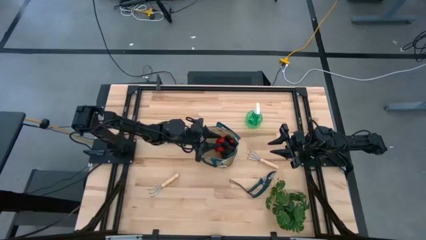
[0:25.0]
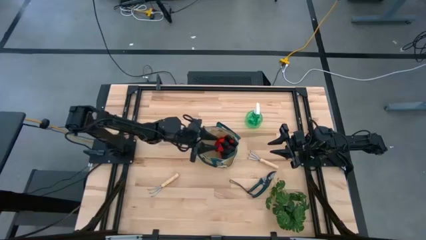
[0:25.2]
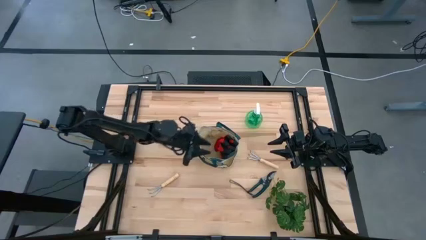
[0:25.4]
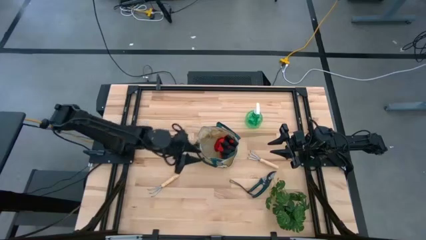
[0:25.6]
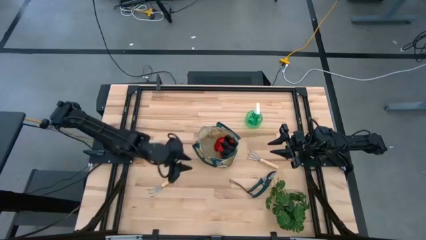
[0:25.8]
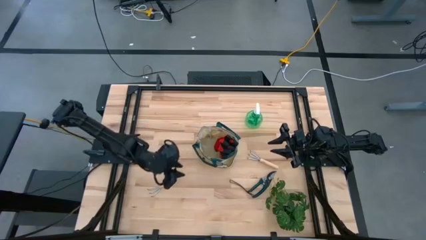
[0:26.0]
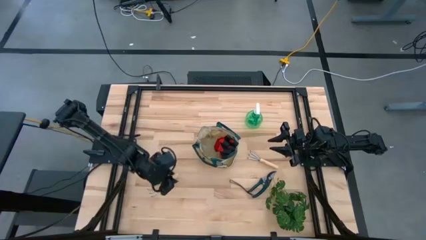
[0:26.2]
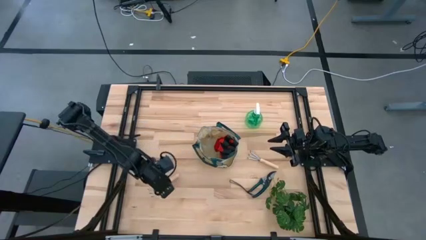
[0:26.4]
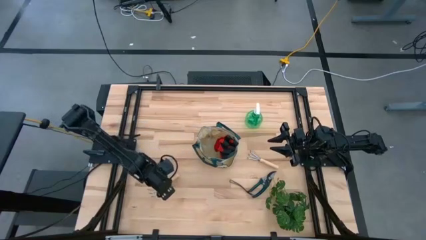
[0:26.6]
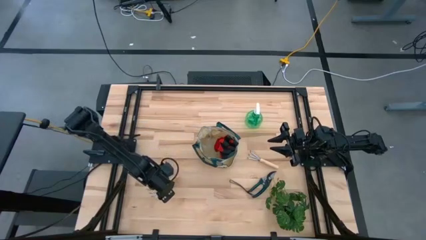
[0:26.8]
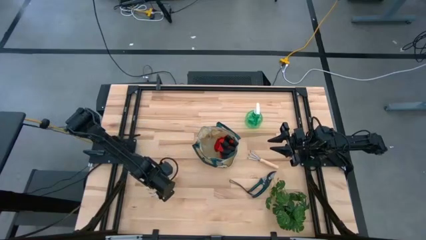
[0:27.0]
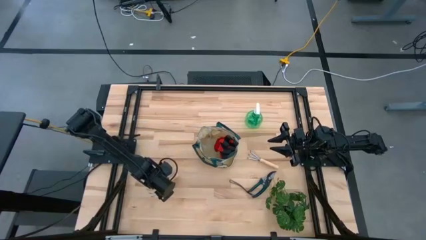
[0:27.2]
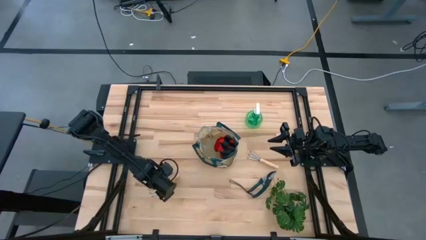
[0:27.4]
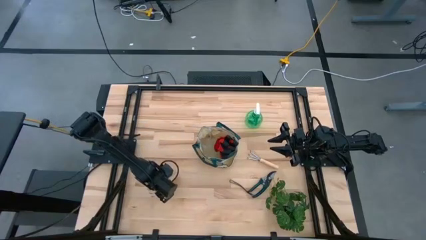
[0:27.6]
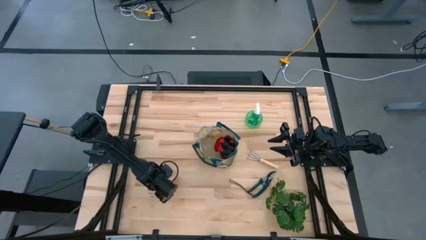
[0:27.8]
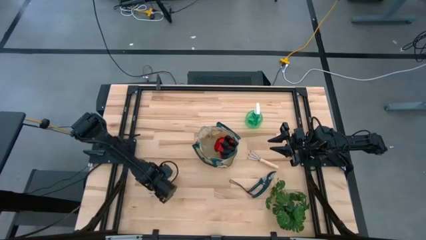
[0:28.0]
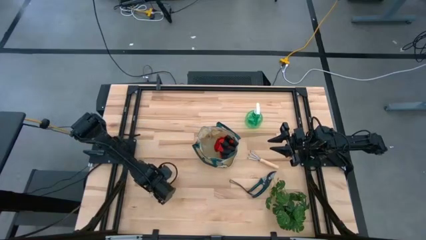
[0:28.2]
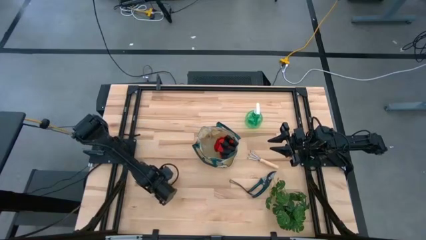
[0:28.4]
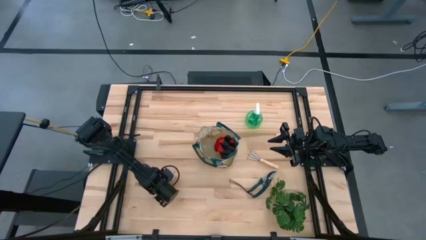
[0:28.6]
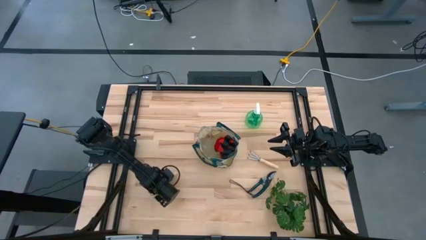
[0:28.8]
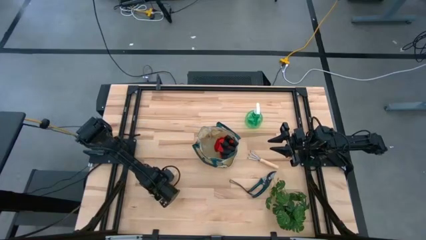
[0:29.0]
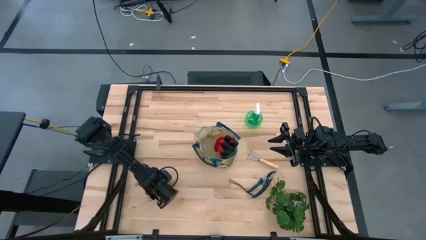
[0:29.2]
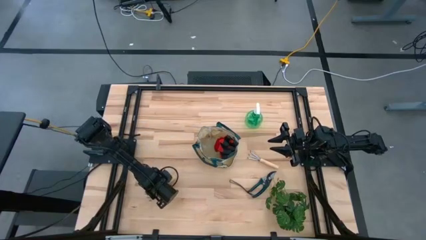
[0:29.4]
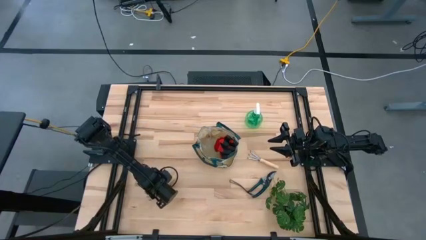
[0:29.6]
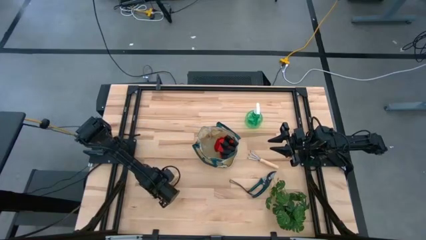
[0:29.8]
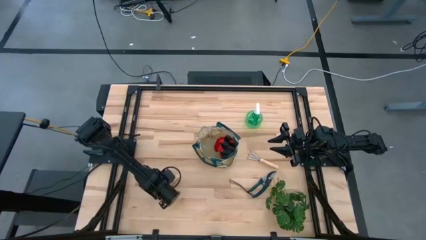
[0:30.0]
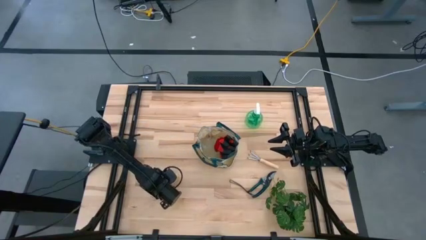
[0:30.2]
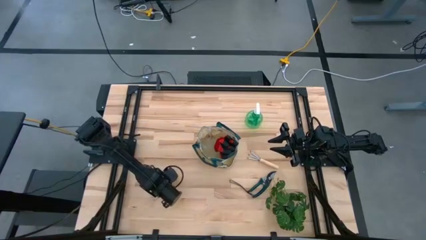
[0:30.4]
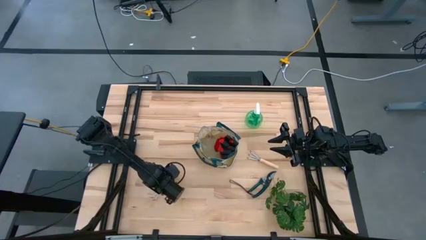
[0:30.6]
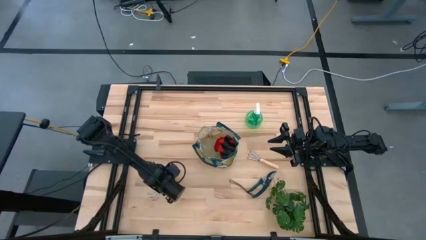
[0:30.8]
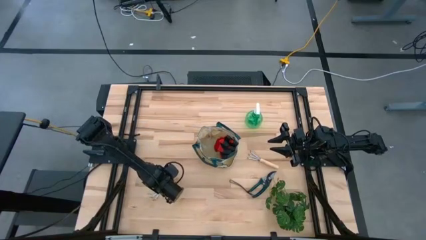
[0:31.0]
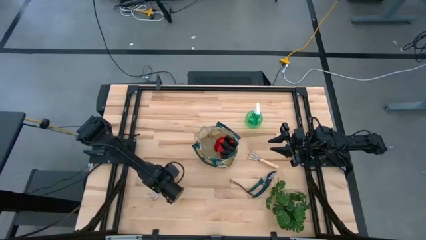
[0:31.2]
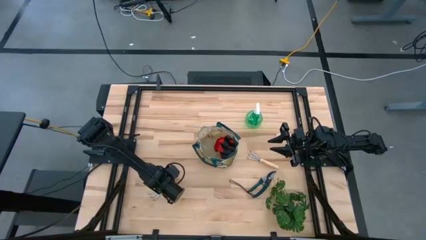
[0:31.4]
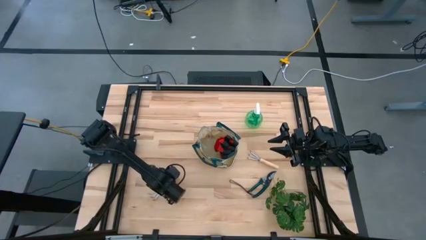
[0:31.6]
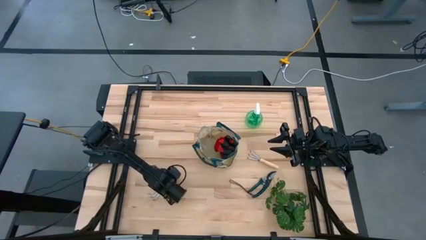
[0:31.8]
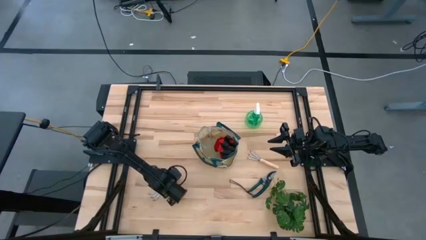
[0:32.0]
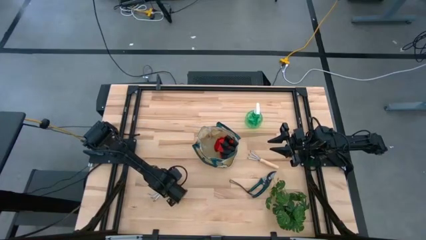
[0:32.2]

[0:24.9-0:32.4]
Task: Pick & Place Garden tools in Gardening bag
Put the left brown hand rake into the green gardening bag

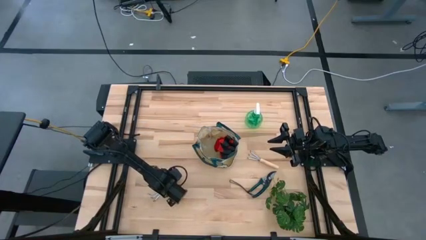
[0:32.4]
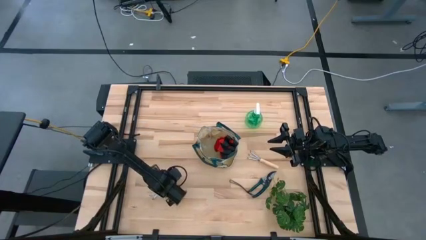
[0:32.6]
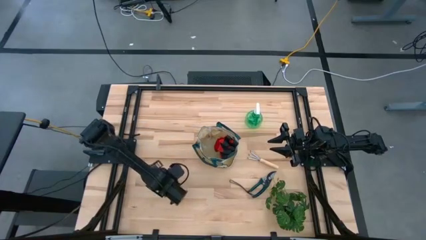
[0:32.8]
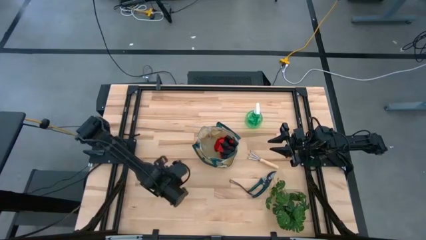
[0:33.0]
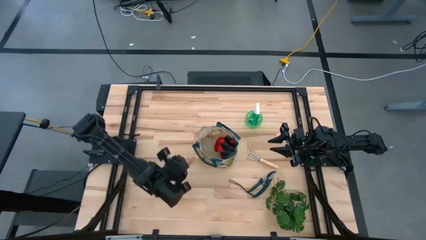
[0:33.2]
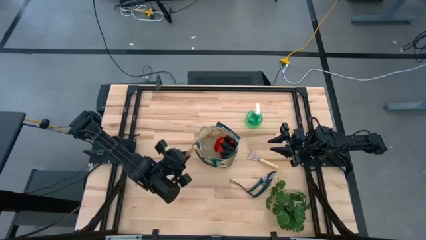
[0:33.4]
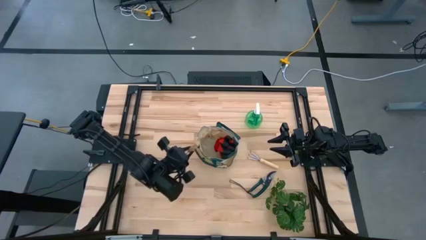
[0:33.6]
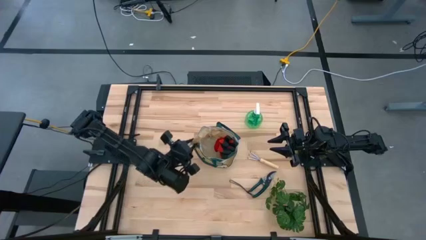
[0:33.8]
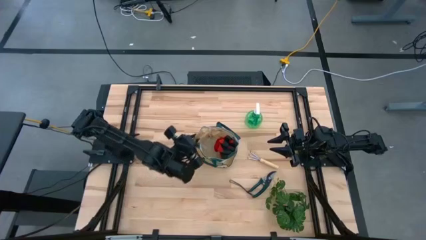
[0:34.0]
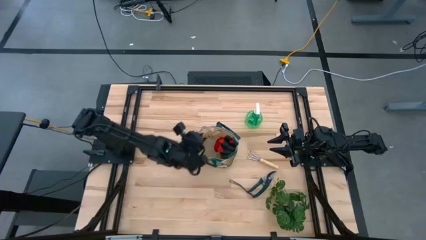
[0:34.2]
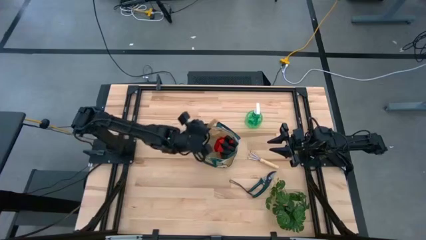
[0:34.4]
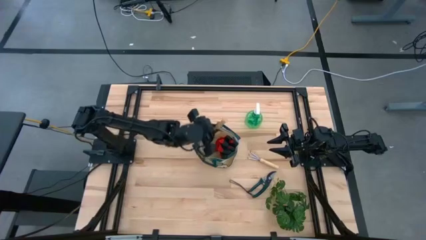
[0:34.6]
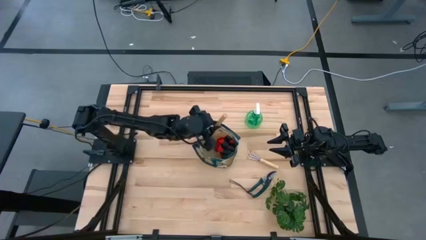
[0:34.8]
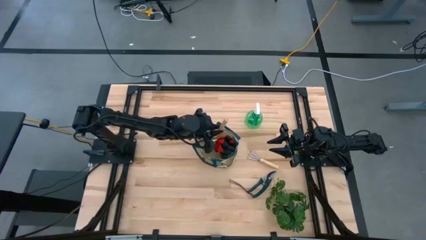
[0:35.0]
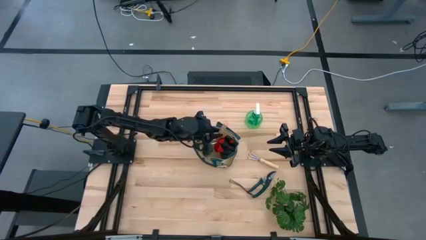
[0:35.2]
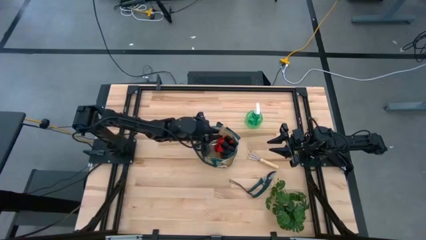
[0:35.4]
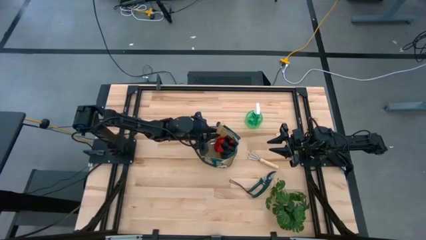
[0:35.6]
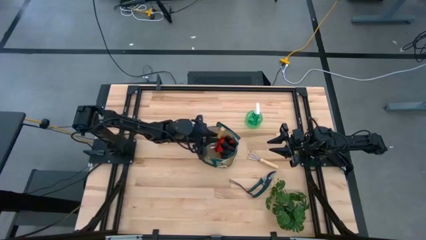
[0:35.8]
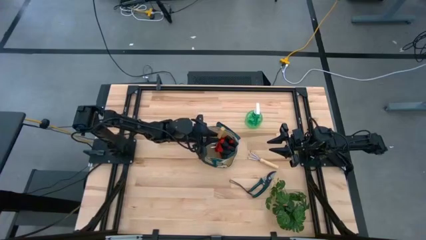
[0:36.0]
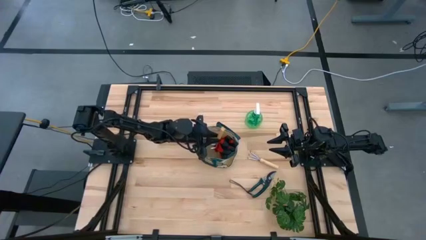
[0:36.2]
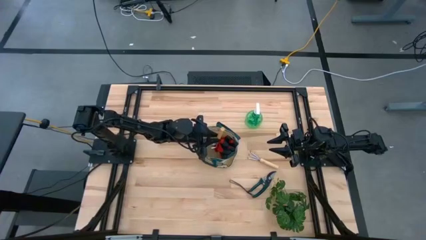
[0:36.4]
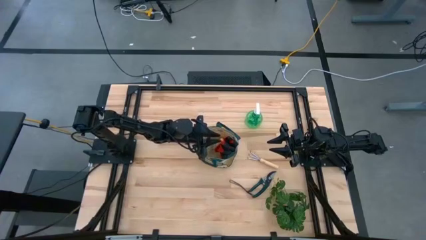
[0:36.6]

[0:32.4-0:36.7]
Put the left brown hand rake into the green gardening bag

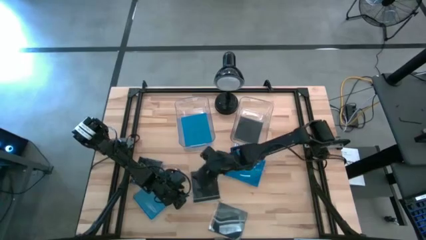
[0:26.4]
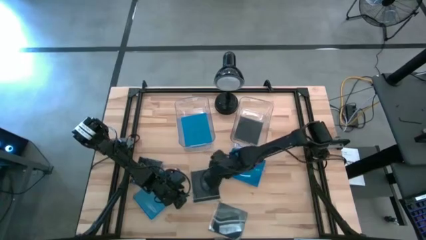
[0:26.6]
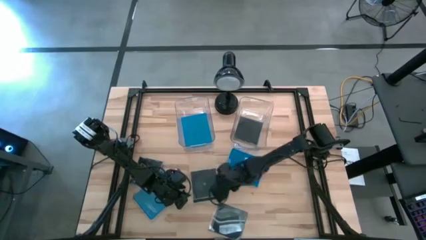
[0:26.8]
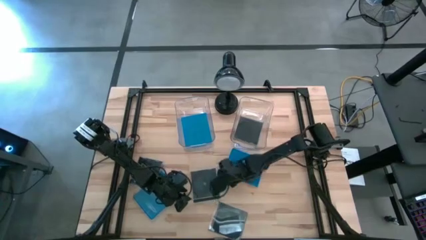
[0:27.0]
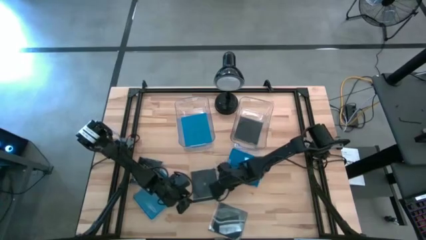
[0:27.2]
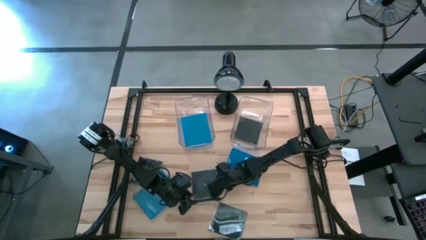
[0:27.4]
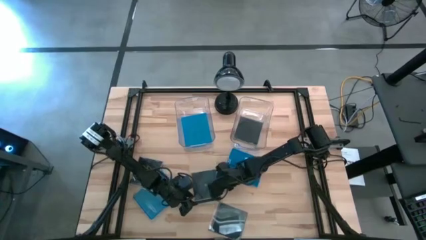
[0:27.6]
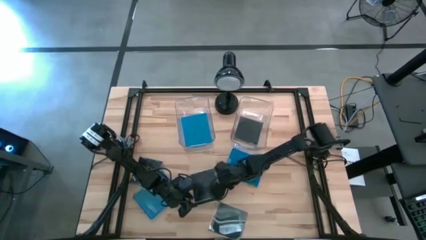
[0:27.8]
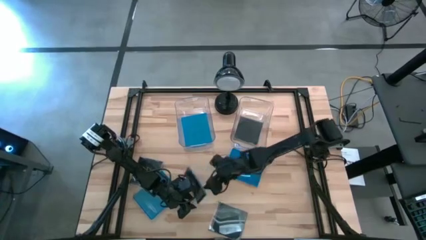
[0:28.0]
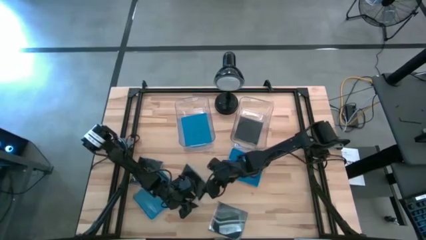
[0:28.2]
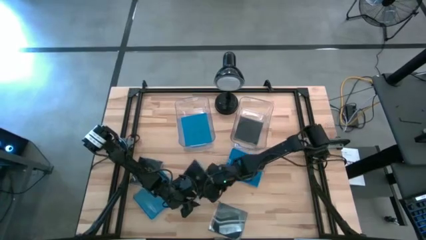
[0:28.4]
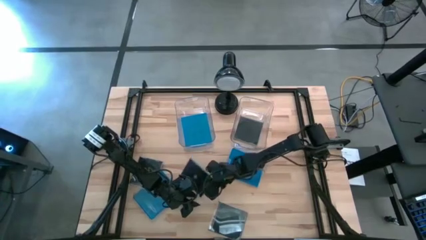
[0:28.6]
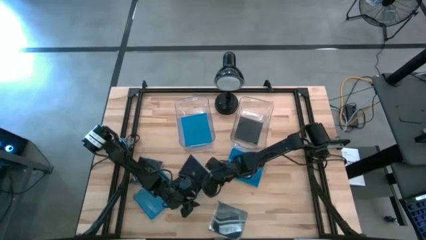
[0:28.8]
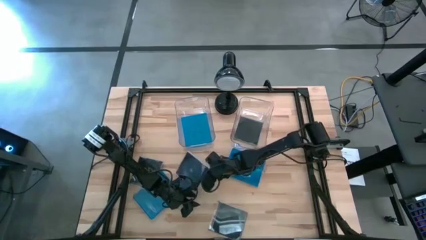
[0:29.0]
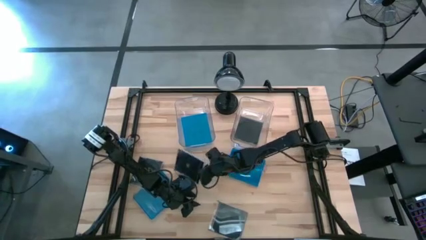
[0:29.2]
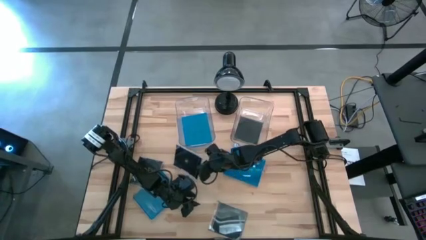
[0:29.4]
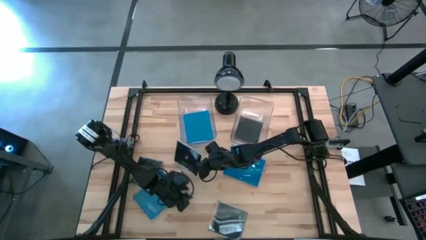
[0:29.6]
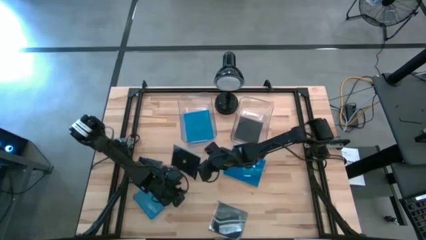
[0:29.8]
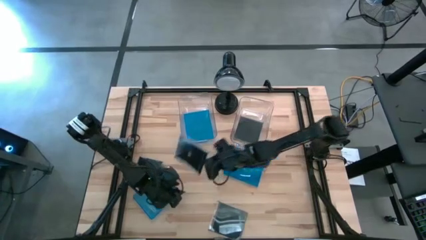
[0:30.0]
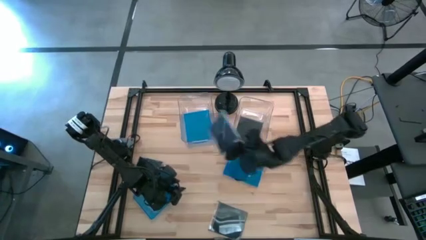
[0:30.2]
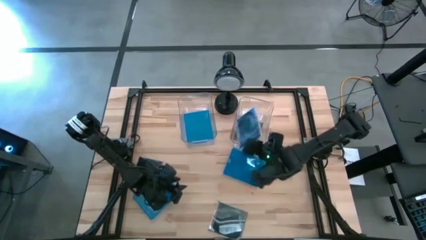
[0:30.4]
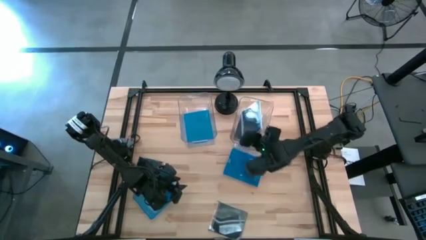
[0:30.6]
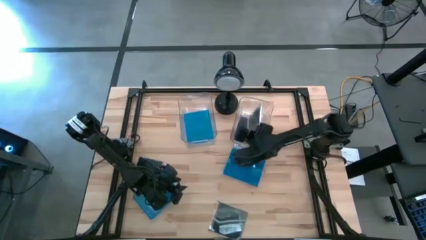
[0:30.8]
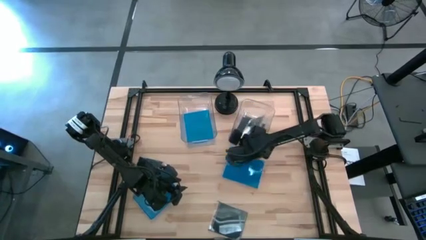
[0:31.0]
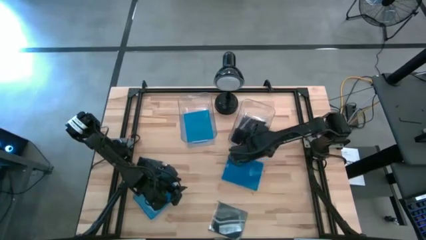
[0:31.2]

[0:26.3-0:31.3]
Task: Pick & place jewel cases by type
Put the black CD case into the right transparent bin
